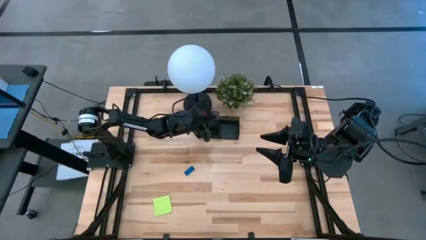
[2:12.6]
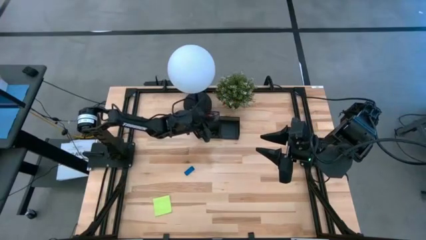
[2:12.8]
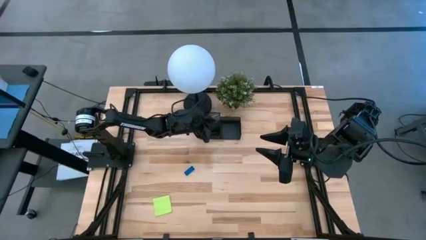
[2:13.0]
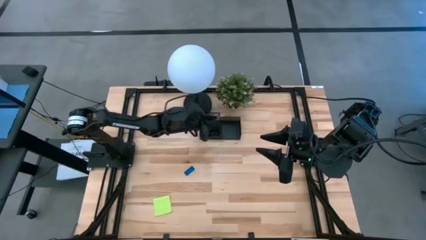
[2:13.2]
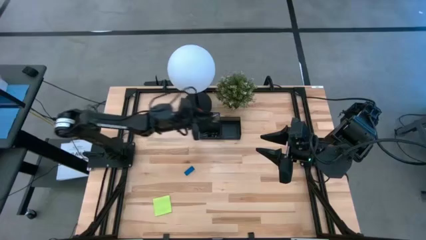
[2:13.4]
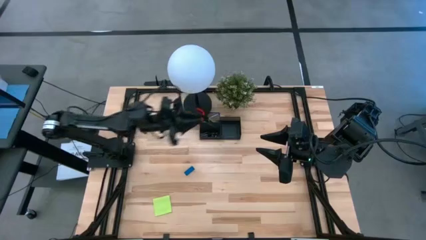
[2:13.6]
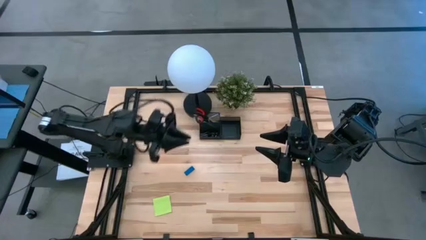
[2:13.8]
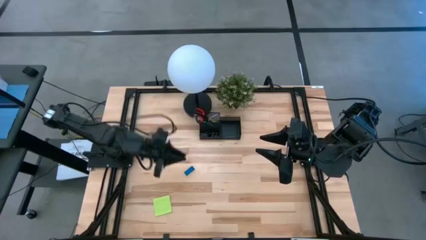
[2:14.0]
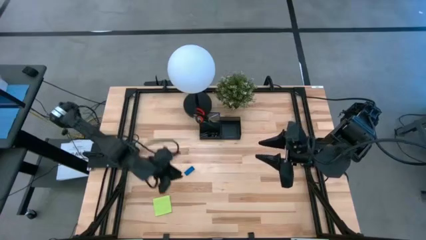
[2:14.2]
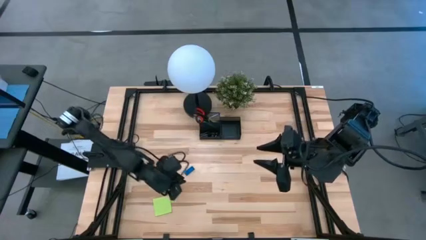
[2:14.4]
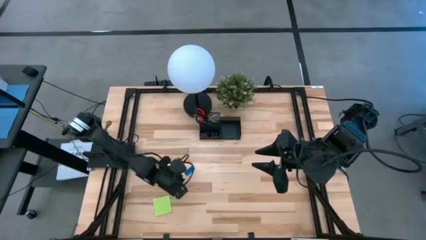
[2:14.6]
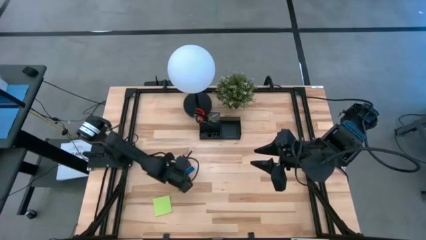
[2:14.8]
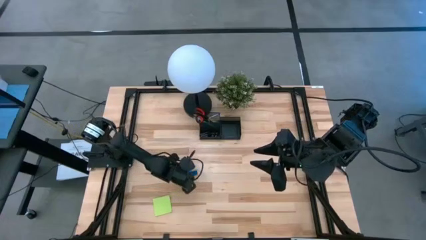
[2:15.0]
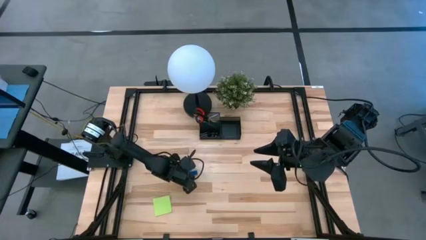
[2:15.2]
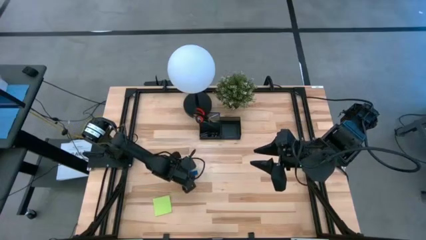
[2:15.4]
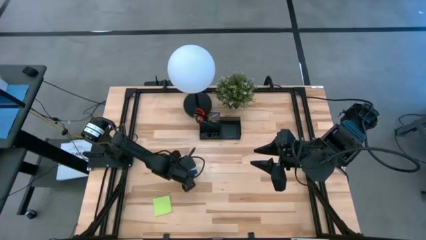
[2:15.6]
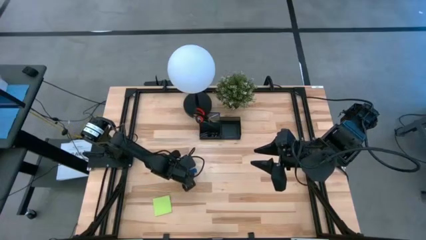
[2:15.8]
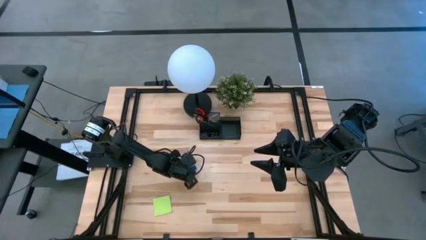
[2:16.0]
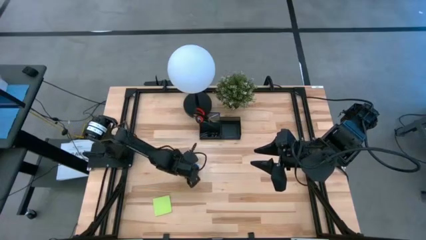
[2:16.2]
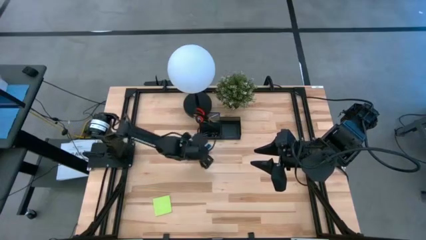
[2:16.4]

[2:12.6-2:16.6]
Task: Pick and place office supplies into organizer
Put the blue eraser into the black desk organizer

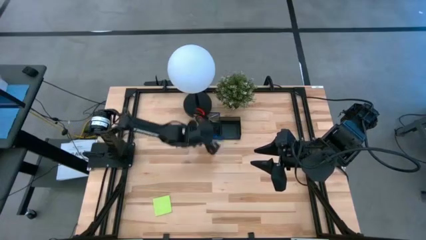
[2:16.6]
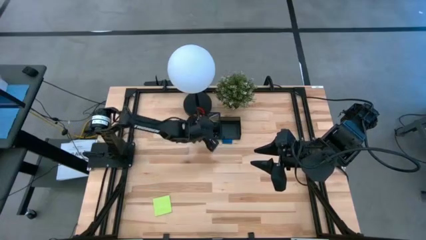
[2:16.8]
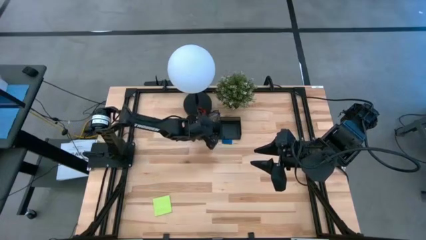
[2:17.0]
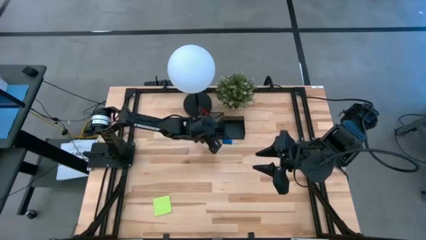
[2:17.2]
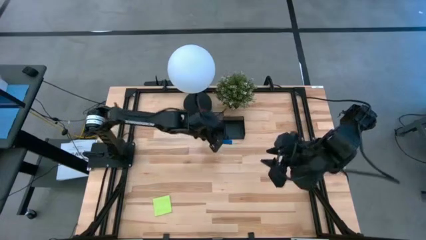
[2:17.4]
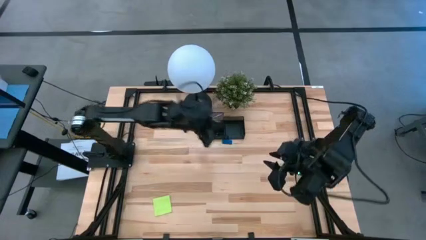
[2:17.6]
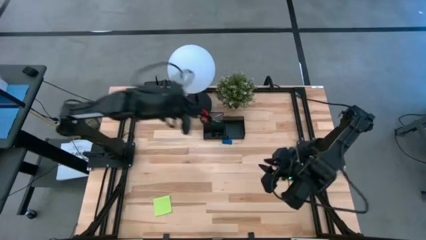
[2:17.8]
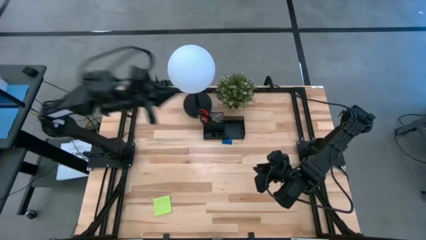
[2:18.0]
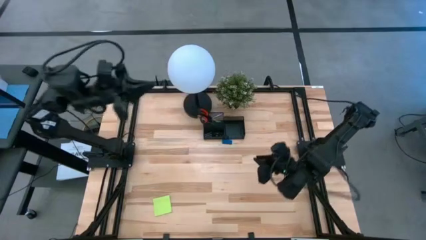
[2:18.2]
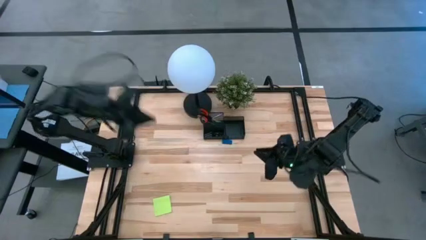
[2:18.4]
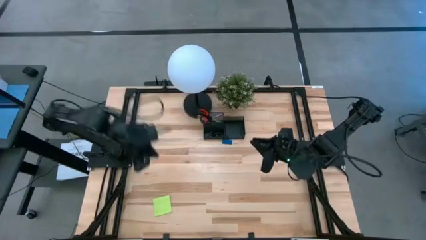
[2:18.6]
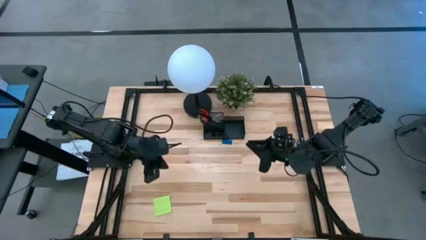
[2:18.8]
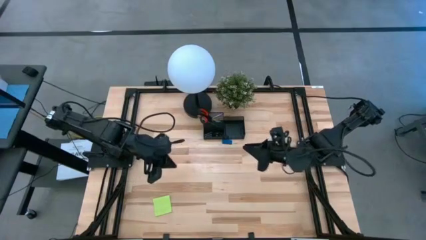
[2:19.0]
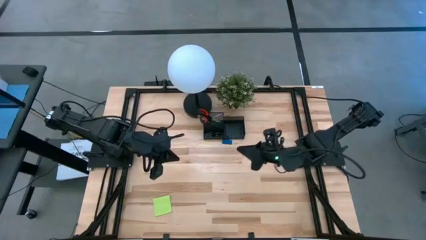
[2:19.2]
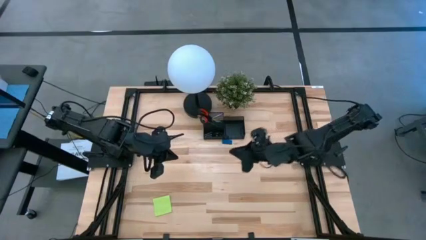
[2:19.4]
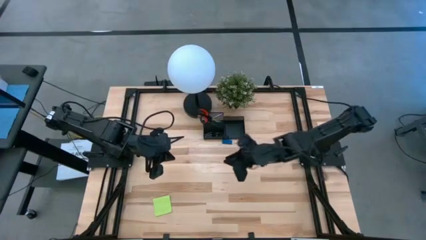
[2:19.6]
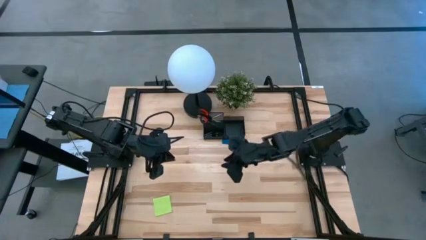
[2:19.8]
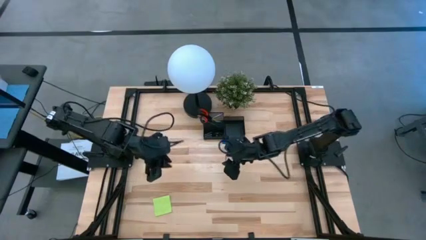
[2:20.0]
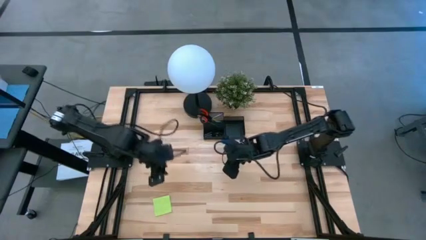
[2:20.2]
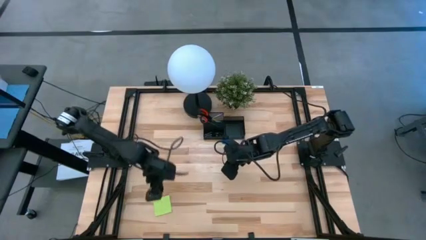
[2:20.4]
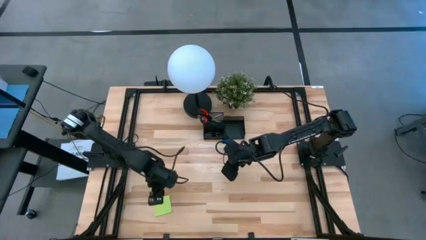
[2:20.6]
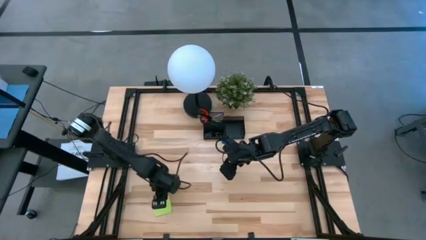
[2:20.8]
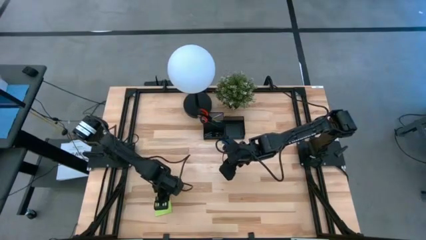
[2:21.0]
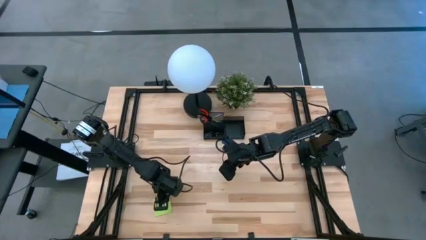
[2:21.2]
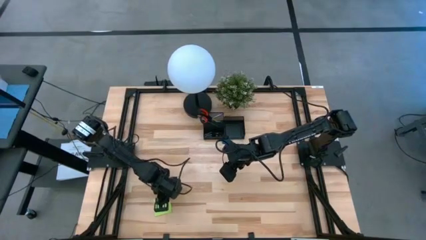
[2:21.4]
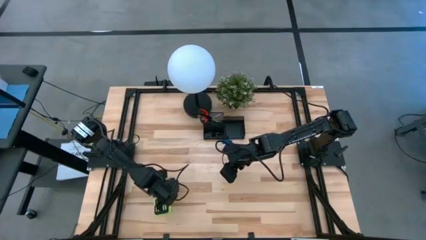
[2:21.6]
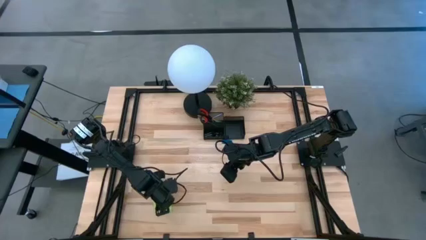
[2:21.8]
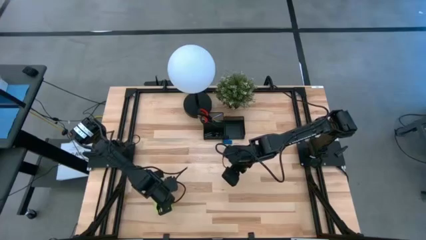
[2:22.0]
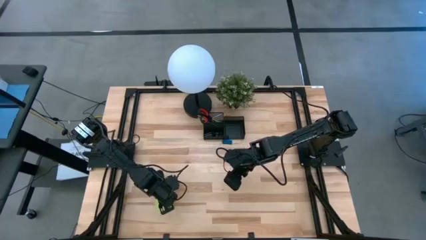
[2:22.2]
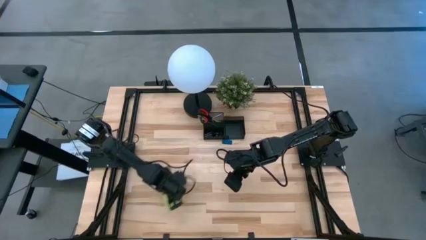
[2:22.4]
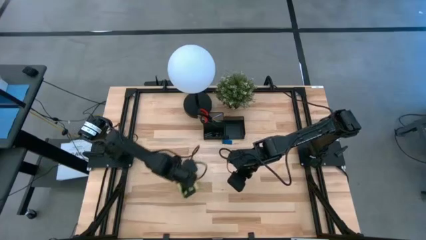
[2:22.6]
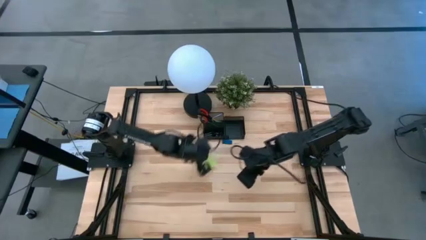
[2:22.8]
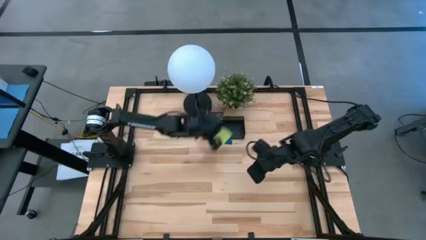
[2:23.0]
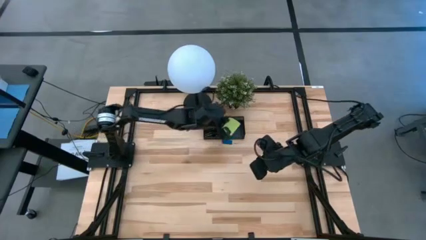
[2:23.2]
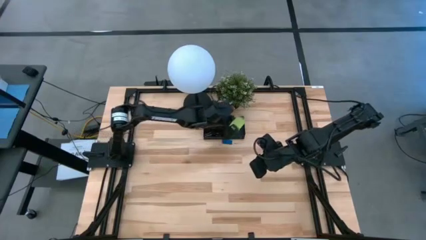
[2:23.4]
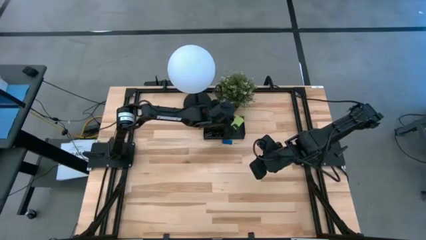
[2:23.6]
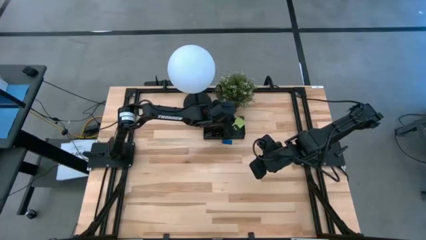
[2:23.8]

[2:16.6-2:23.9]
Put the green sticky notes into the black desk organizer

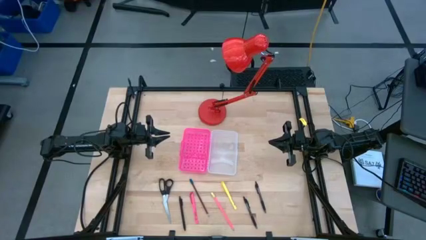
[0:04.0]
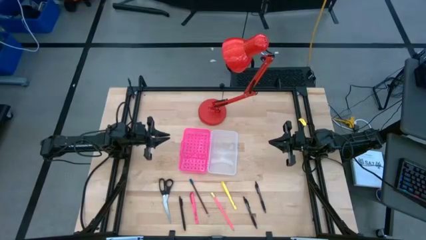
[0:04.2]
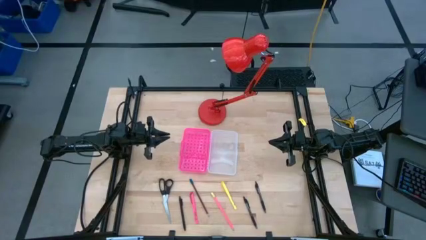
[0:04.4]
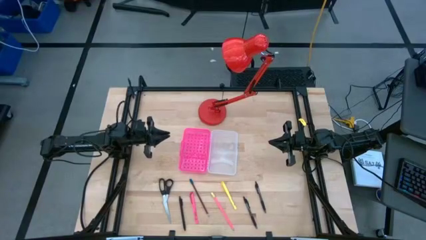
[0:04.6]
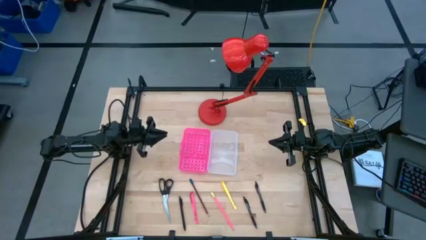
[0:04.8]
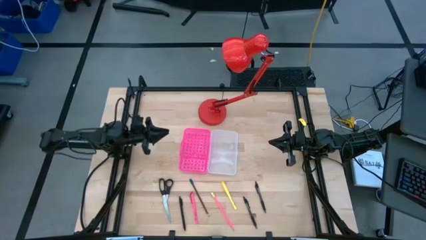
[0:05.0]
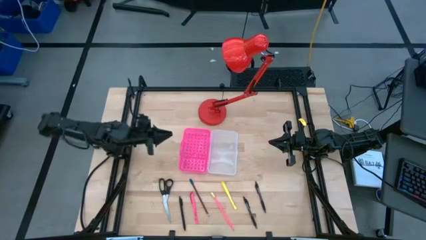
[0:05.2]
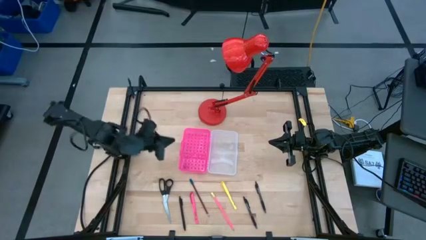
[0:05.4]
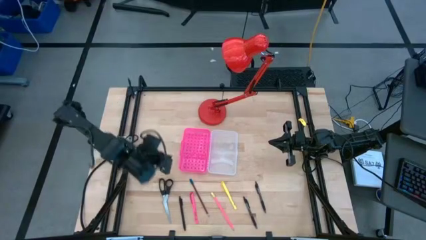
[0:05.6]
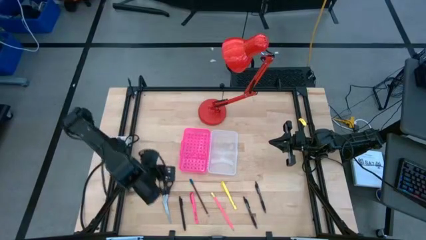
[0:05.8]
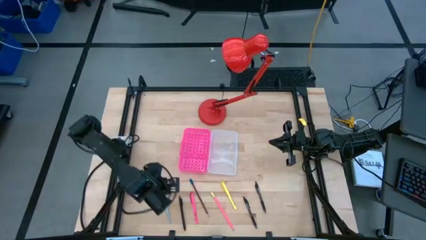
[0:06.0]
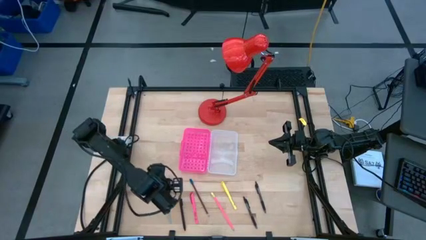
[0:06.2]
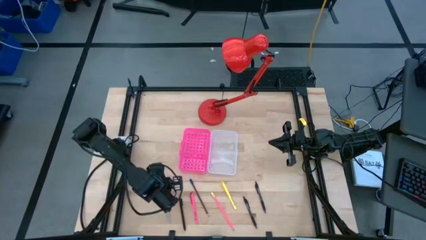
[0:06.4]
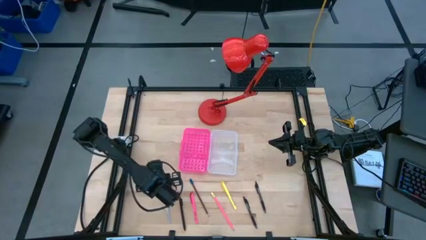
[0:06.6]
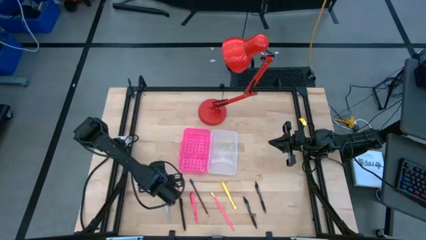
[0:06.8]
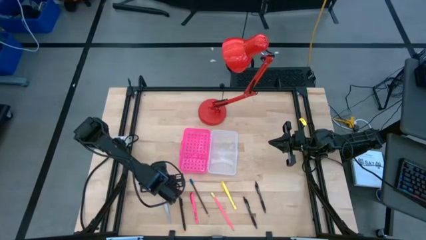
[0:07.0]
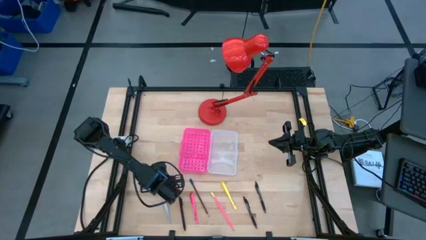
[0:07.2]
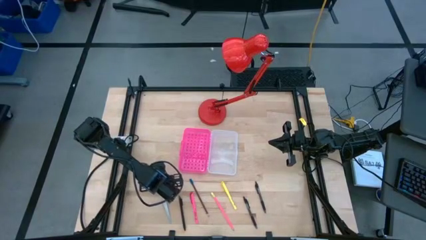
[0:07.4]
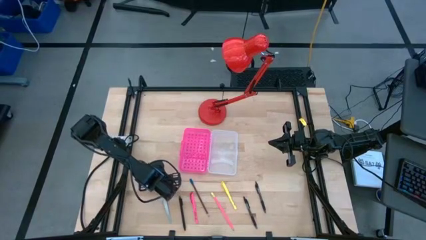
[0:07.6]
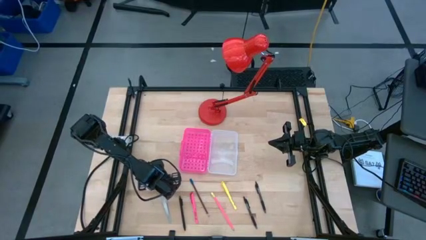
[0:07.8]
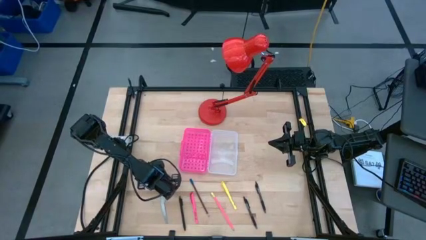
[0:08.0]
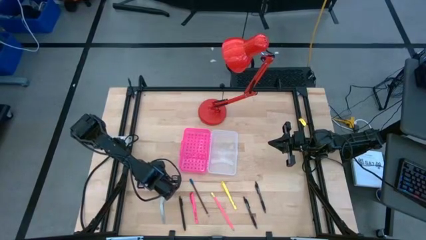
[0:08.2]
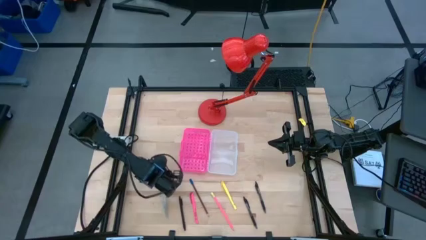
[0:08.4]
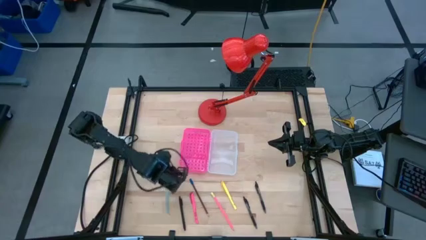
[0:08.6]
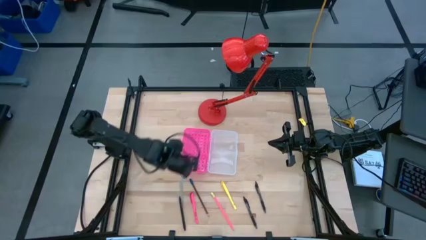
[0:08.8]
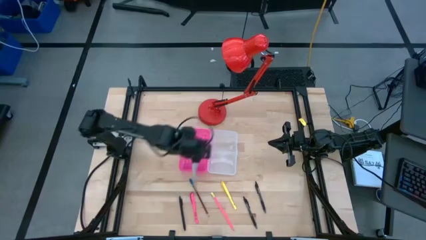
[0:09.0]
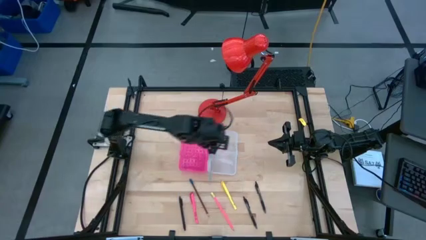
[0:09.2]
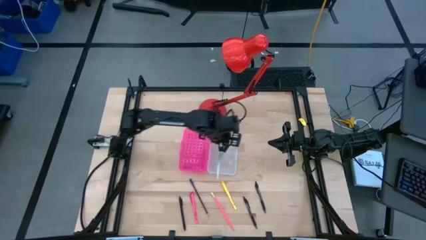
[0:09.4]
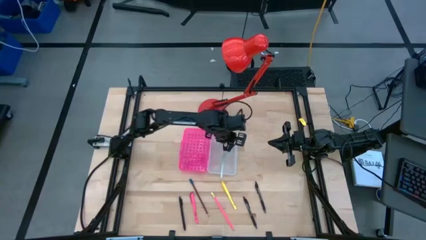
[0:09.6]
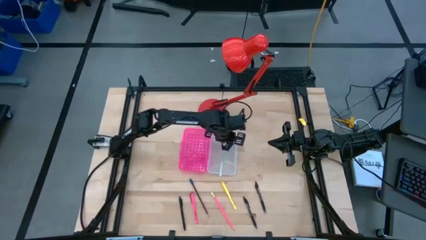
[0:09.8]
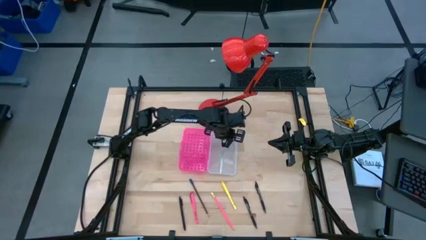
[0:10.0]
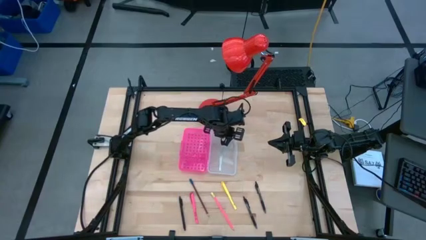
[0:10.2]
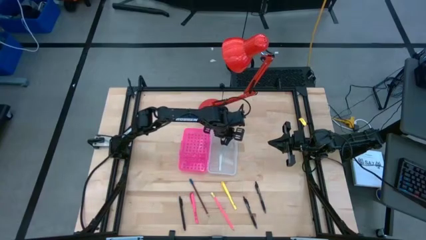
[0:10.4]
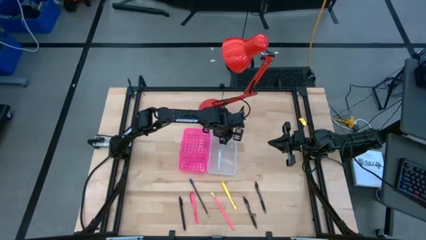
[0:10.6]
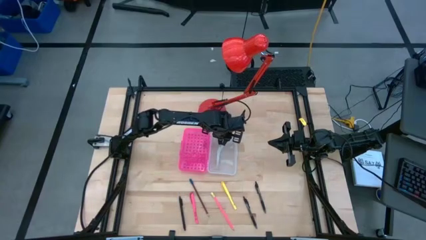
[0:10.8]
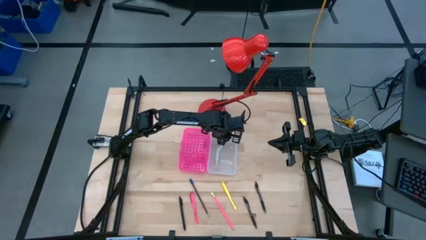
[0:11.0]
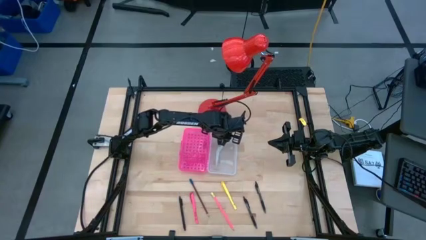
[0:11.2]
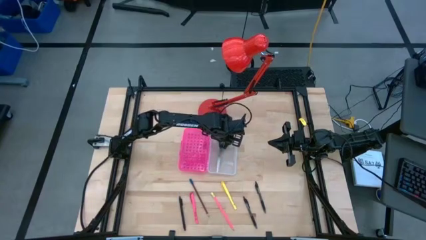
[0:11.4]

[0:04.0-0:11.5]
Task: Pick & place school supplies into a supply box
Put the scissors into the supply box
